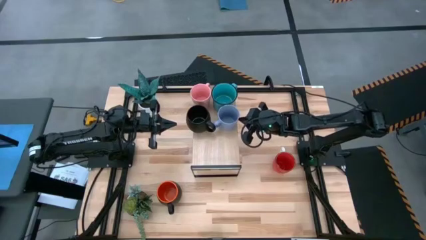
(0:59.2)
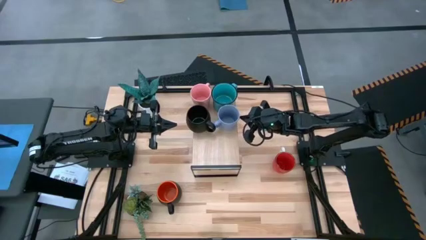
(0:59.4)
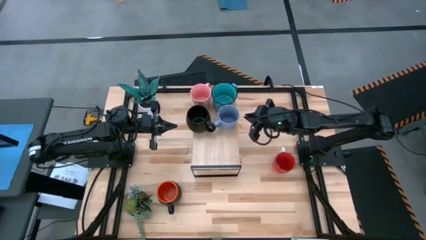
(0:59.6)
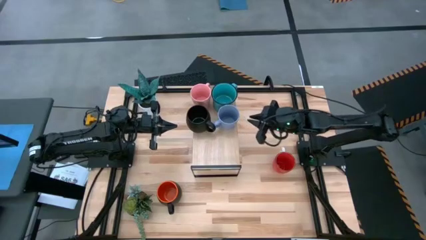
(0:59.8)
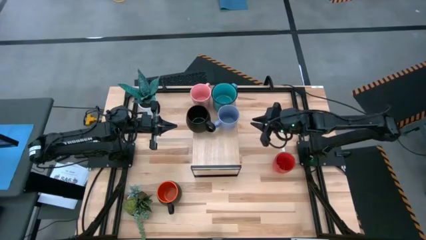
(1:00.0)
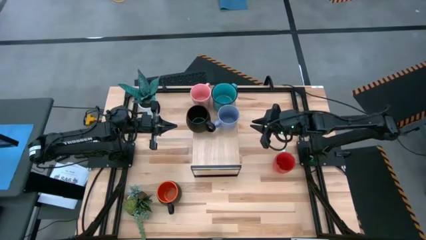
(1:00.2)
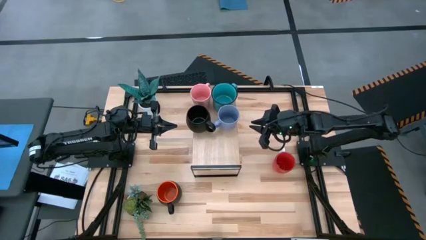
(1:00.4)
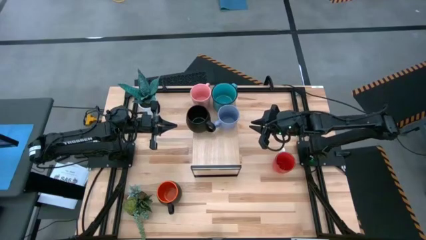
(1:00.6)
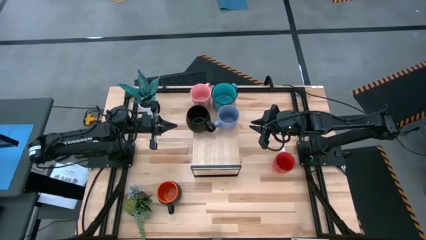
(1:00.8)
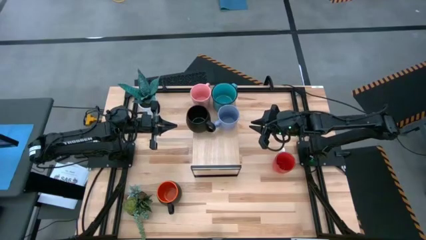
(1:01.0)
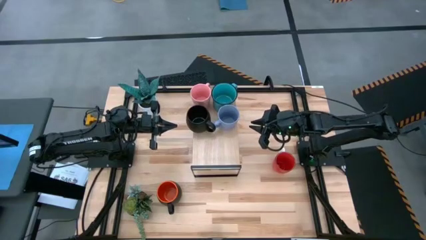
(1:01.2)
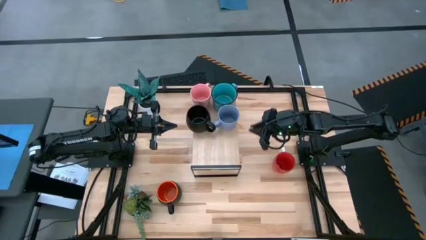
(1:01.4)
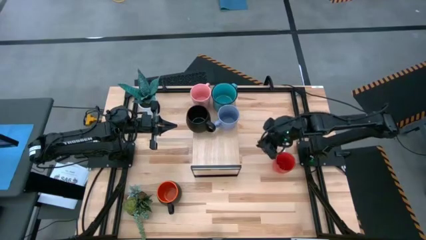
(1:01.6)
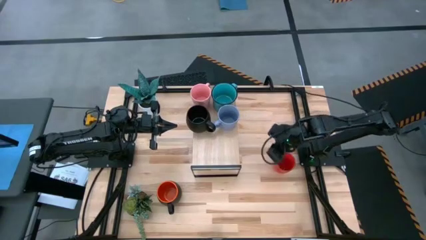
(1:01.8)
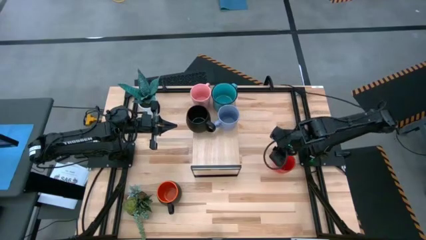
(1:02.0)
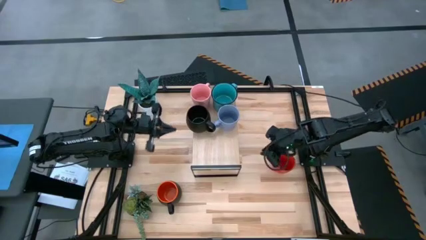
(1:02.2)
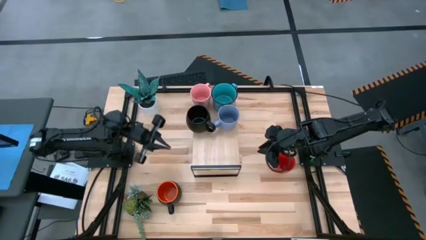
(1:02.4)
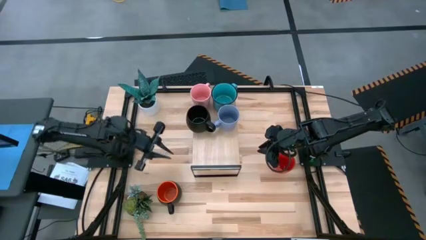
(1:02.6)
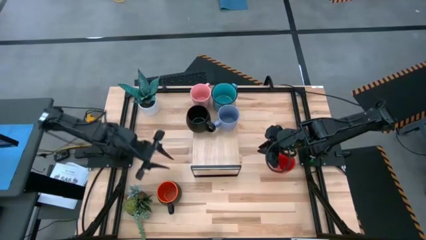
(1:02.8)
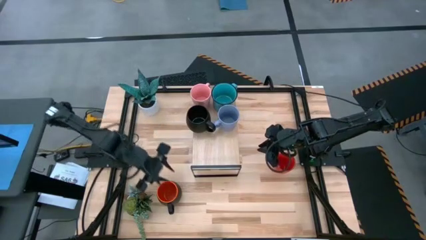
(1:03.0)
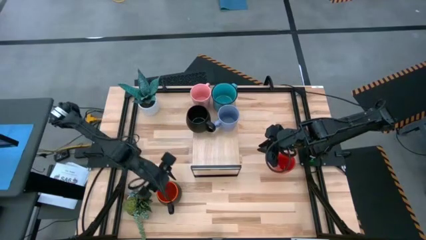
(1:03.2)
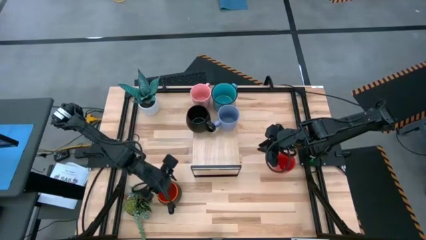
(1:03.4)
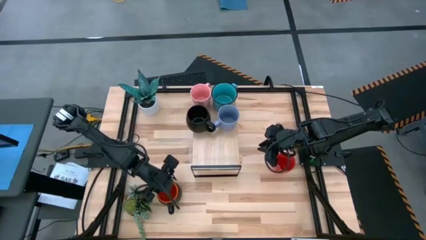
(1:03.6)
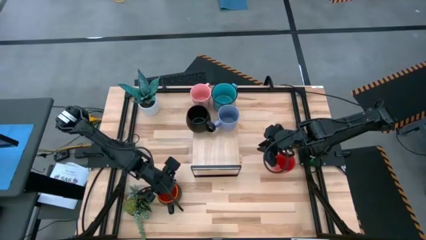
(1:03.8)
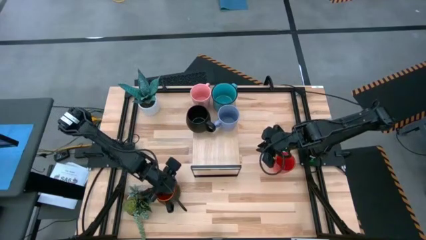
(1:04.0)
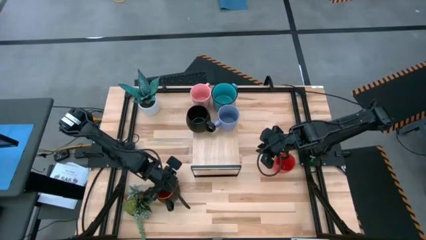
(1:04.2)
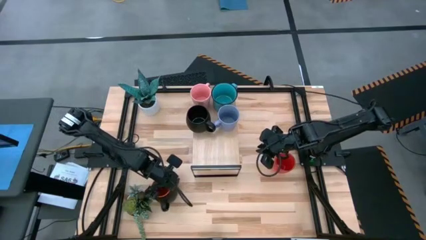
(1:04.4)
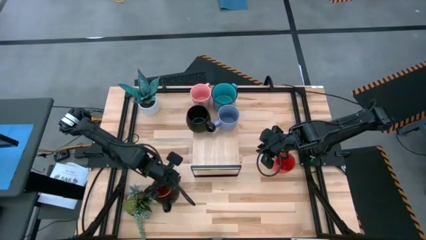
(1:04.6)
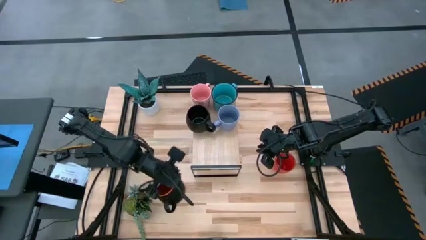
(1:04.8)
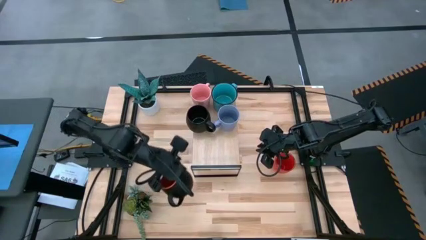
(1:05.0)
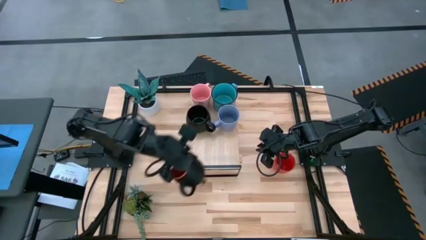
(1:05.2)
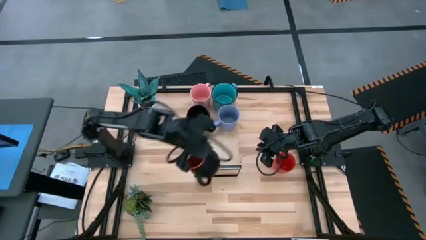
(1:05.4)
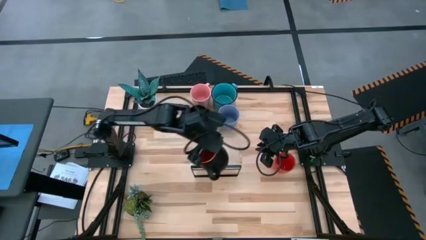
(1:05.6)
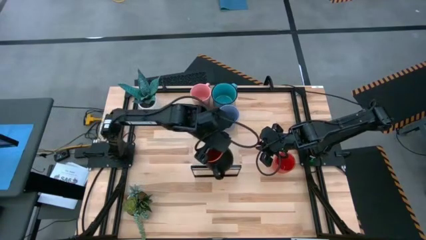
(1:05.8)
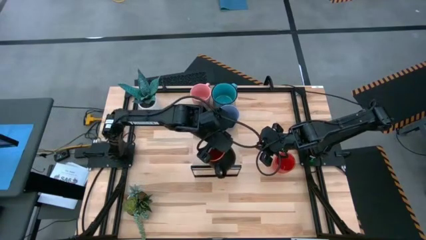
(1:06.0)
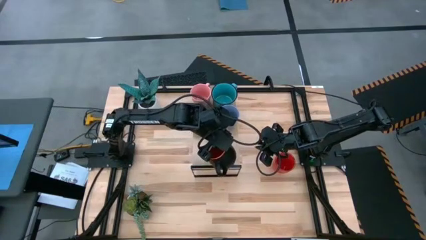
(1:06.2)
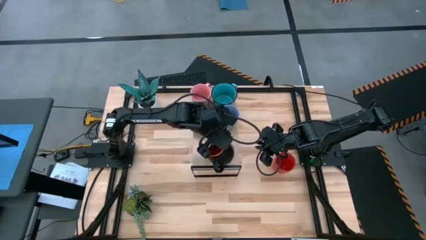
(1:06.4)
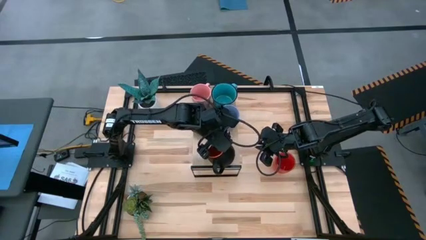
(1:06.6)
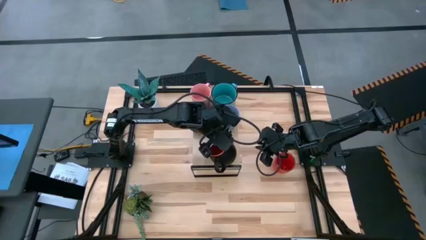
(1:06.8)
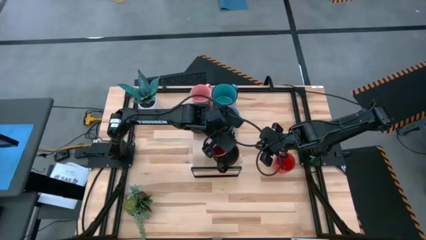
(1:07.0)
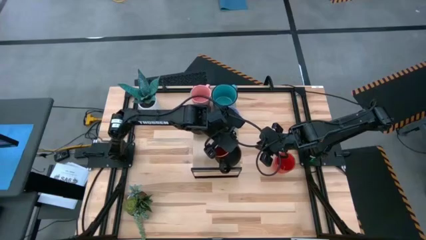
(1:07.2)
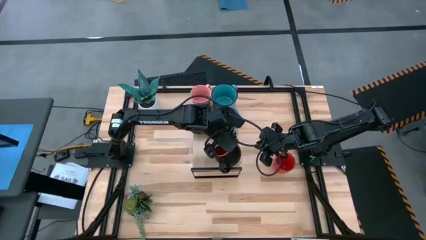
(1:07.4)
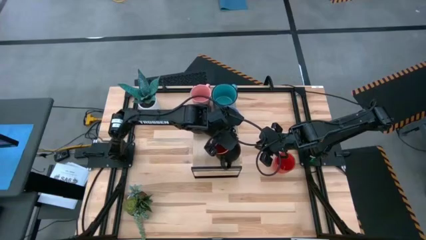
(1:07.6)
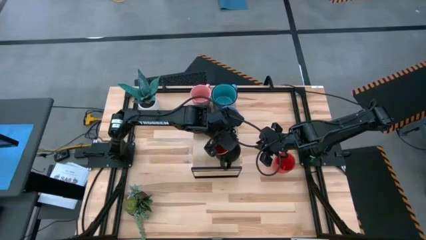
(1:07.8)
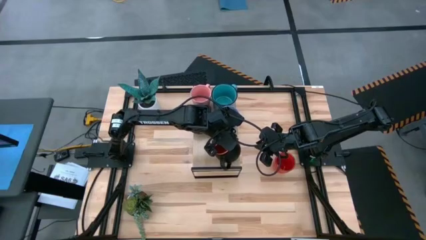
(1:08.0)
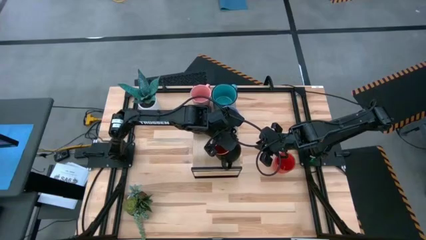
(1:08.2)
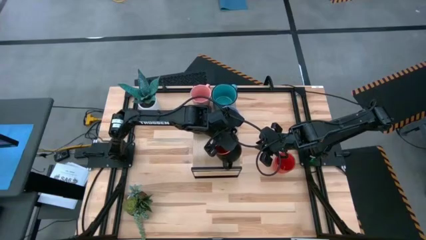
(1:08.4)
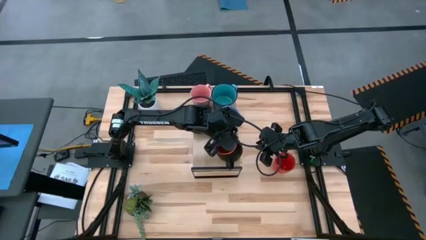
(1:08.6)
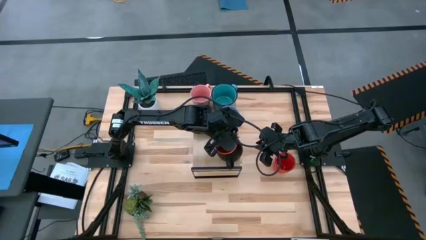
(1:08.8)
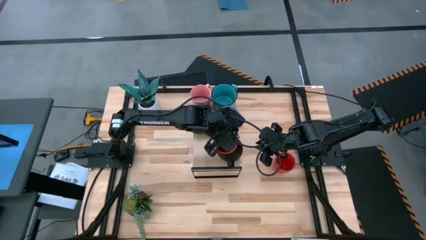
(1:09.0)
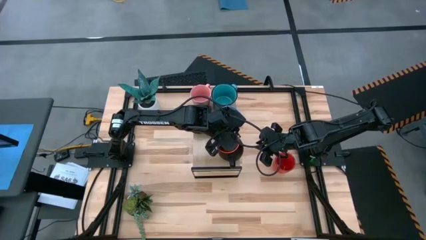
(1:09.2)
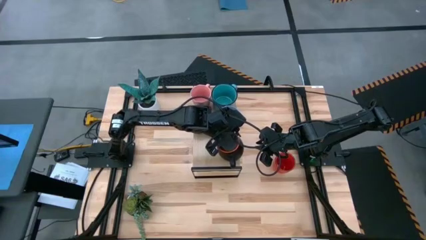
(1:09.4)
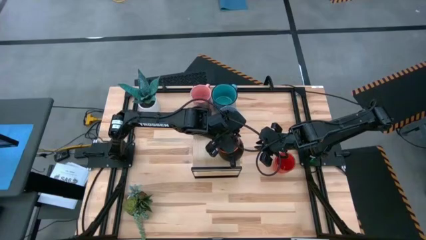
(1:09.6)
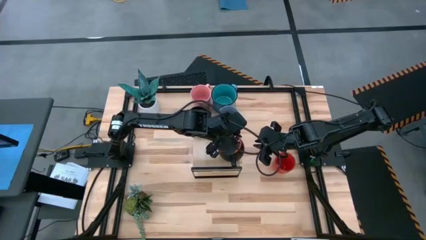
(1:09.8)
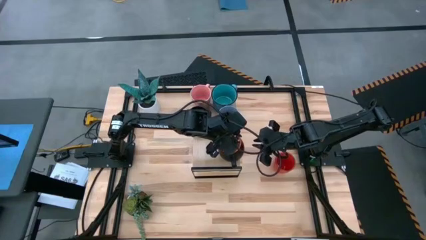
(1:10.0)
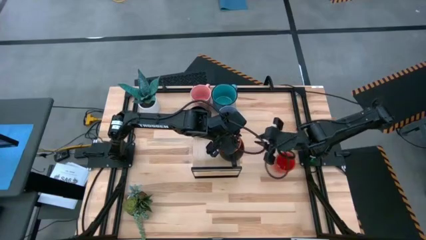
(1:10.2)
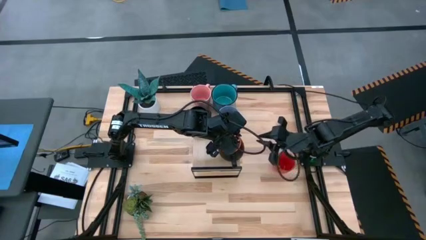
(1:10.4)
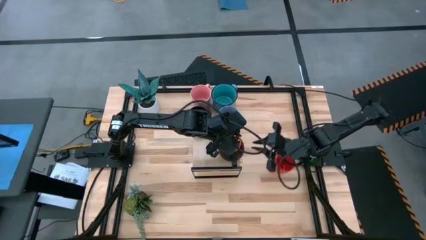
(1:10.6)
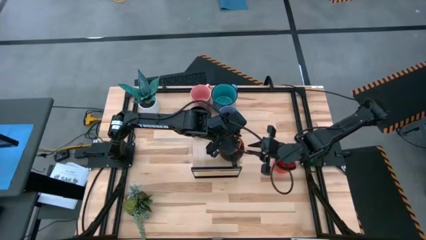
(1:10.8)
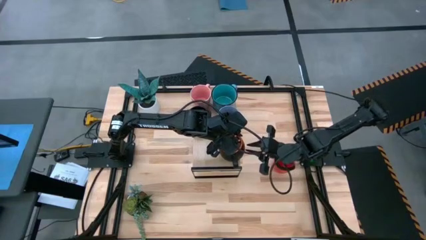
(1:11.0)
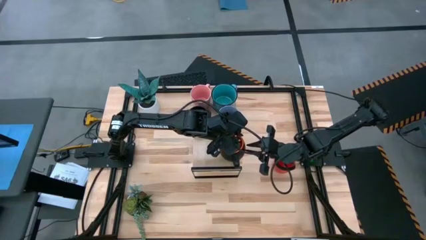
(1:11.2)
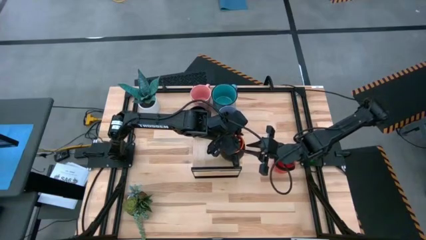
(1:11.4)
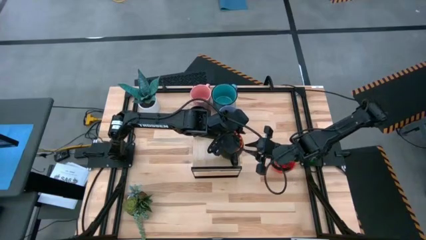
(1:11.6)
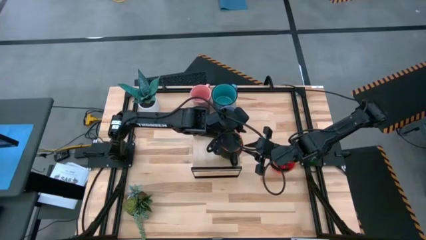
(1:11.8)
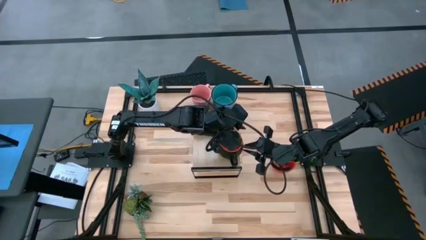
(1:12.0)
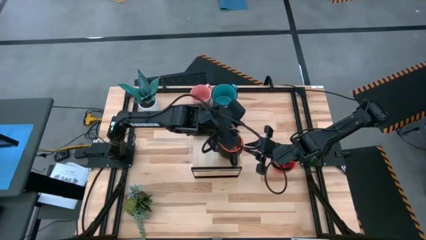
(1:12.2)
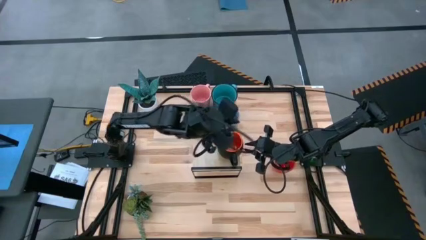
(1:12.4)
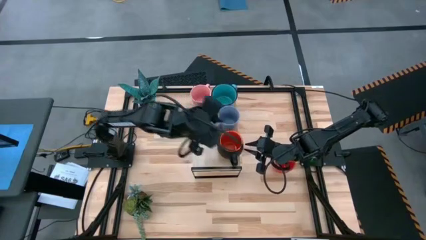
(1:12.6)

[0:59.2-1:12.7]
Task: Place coffee mugs
Put the black orange mug on the shelf
